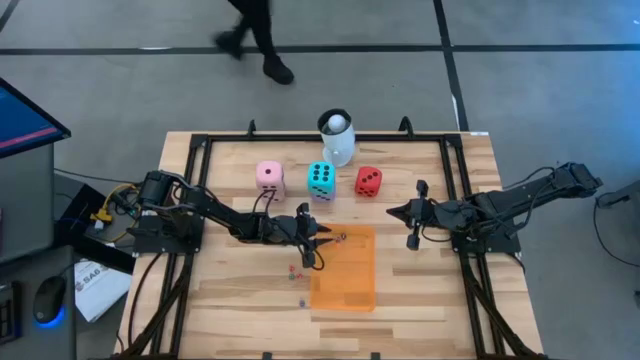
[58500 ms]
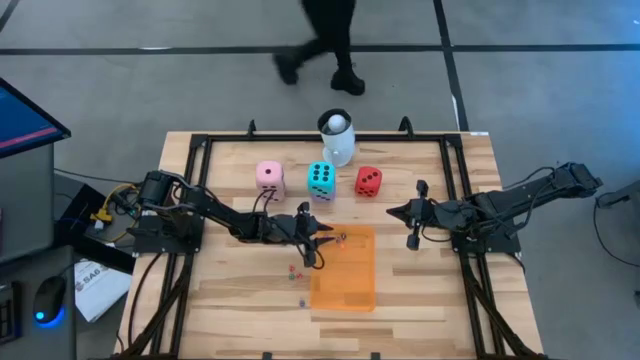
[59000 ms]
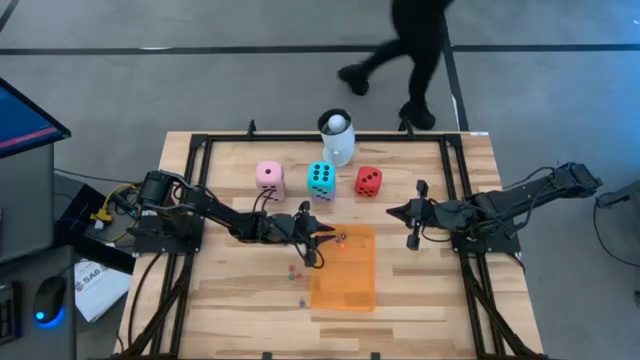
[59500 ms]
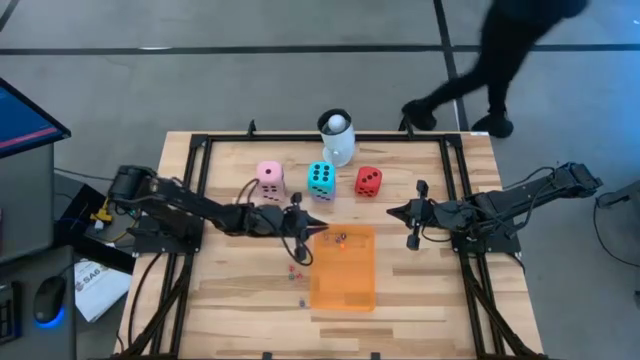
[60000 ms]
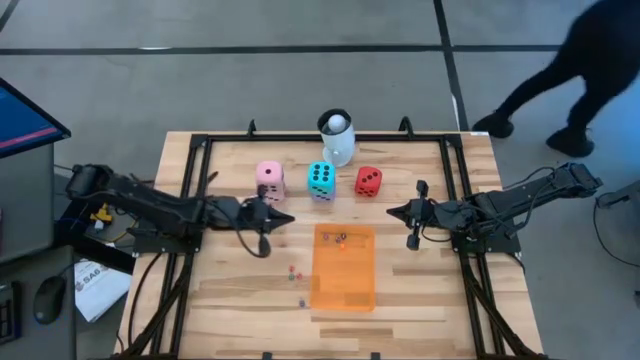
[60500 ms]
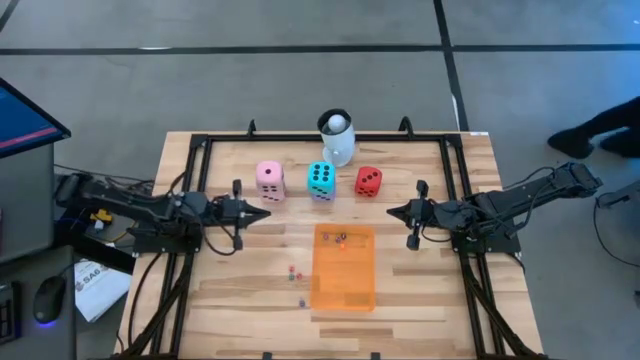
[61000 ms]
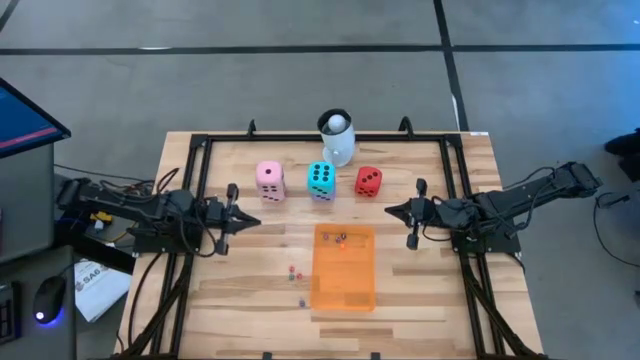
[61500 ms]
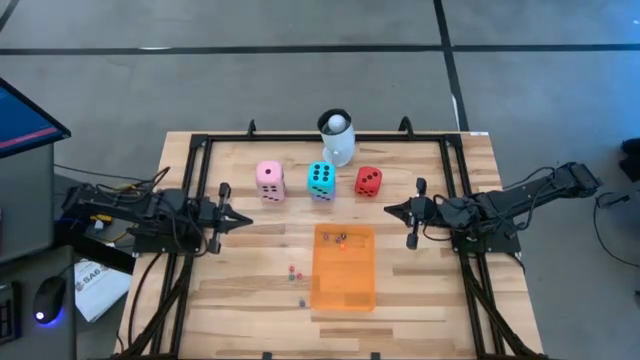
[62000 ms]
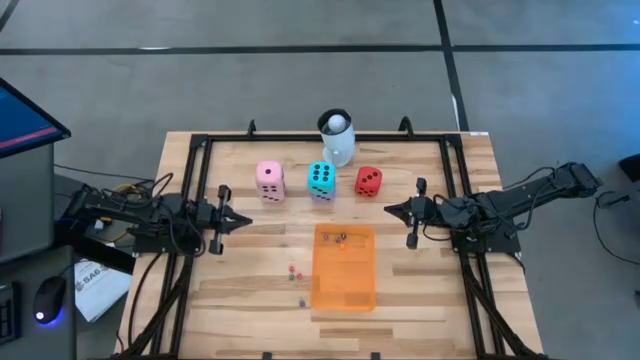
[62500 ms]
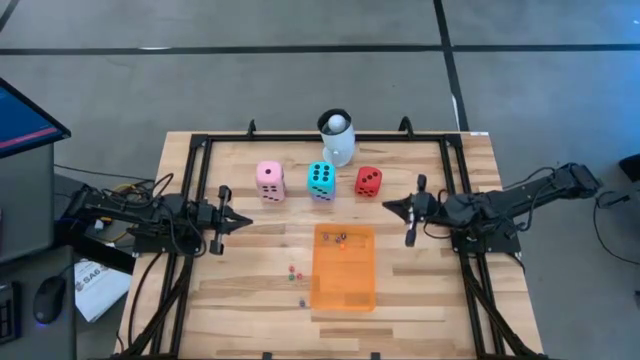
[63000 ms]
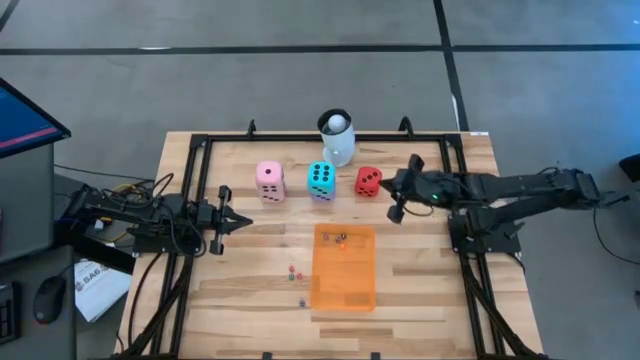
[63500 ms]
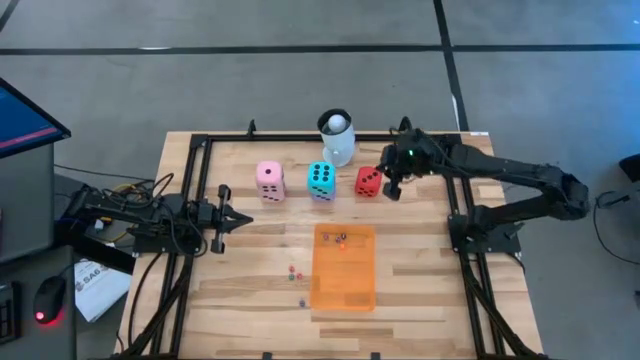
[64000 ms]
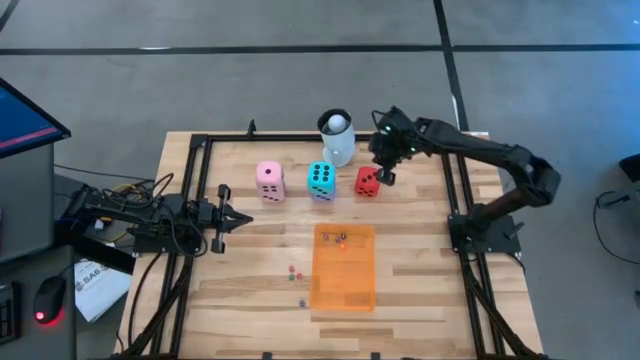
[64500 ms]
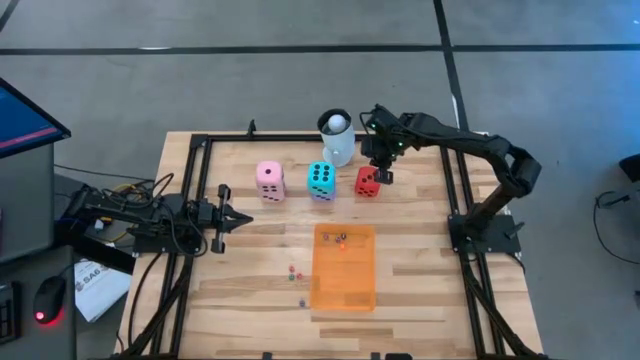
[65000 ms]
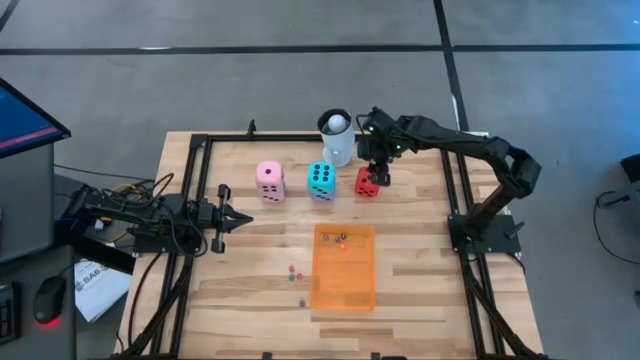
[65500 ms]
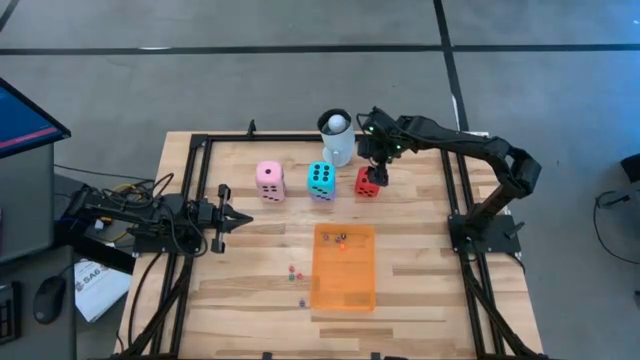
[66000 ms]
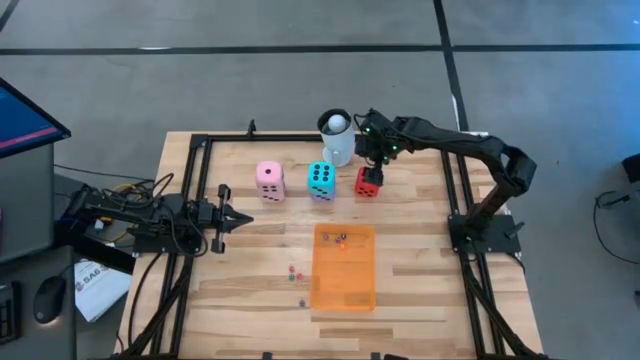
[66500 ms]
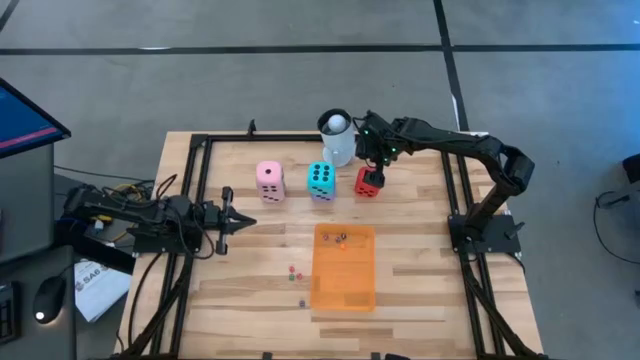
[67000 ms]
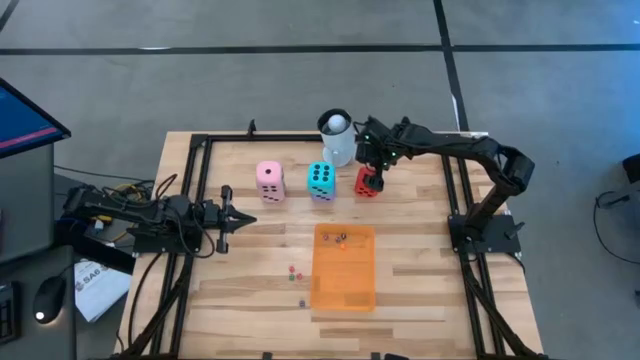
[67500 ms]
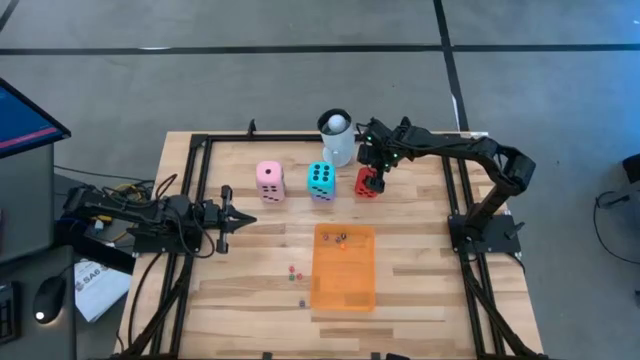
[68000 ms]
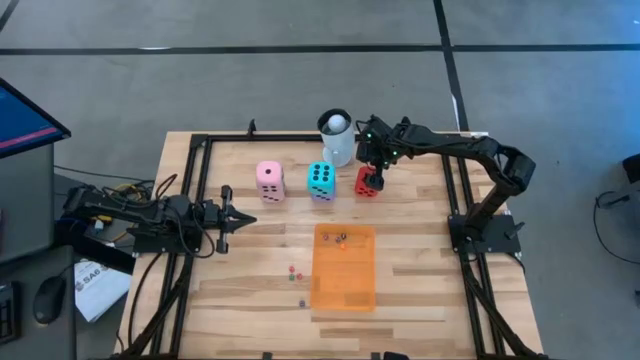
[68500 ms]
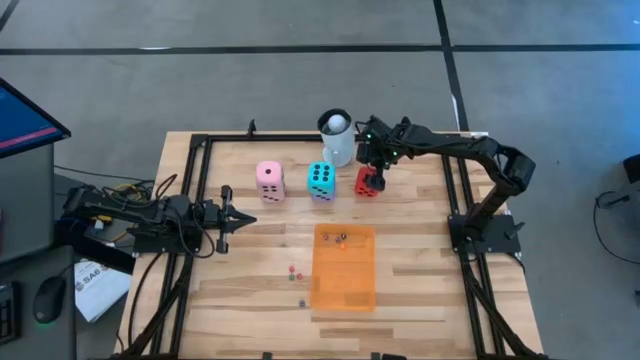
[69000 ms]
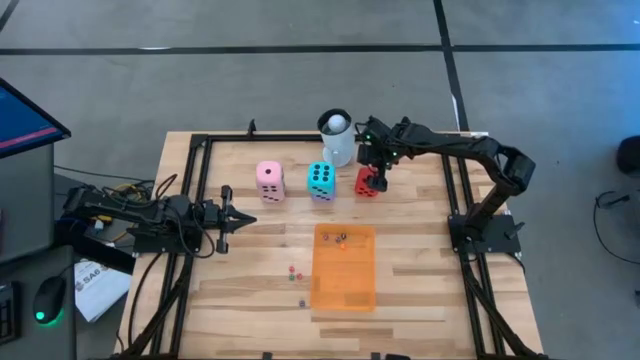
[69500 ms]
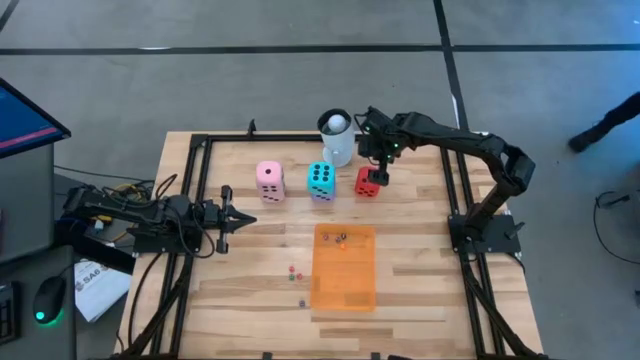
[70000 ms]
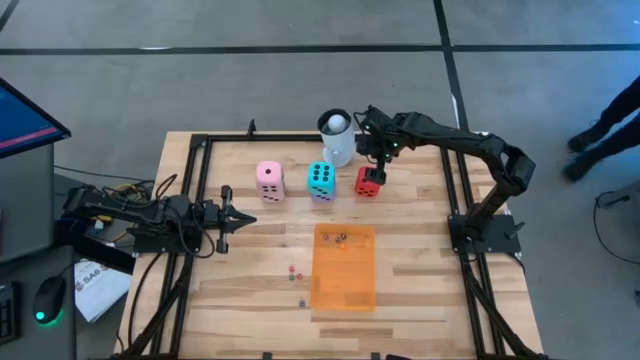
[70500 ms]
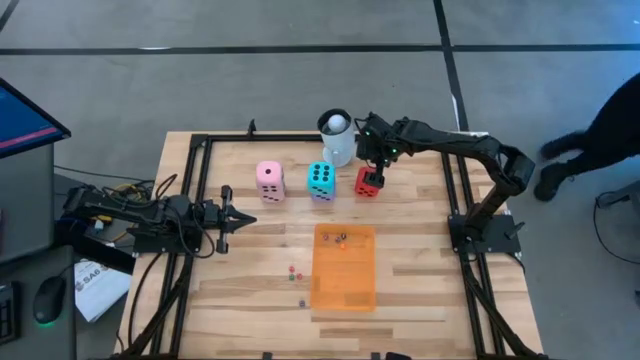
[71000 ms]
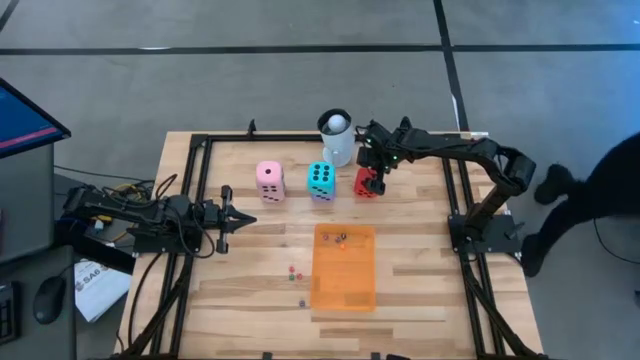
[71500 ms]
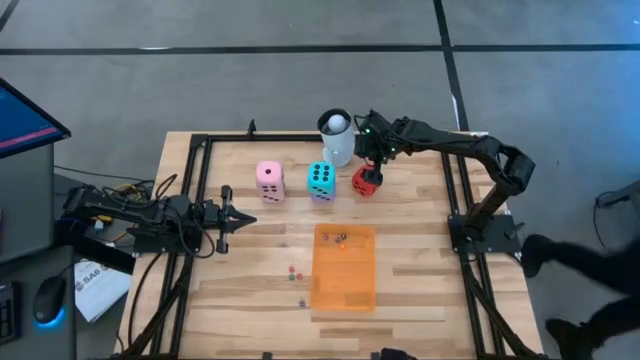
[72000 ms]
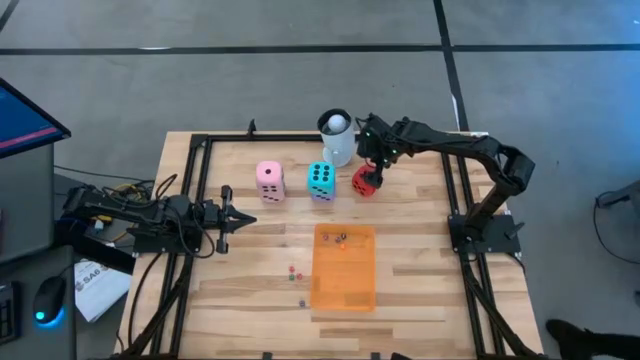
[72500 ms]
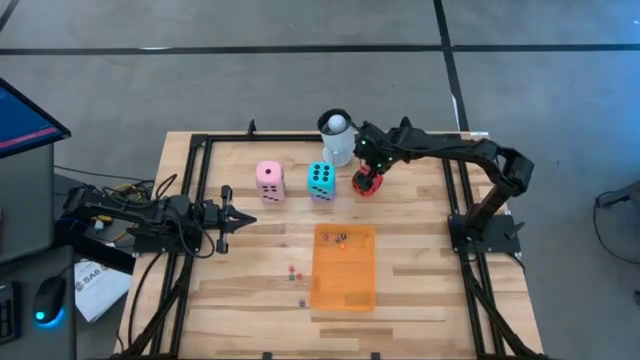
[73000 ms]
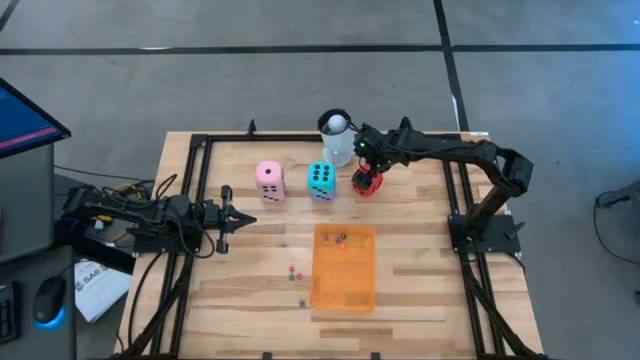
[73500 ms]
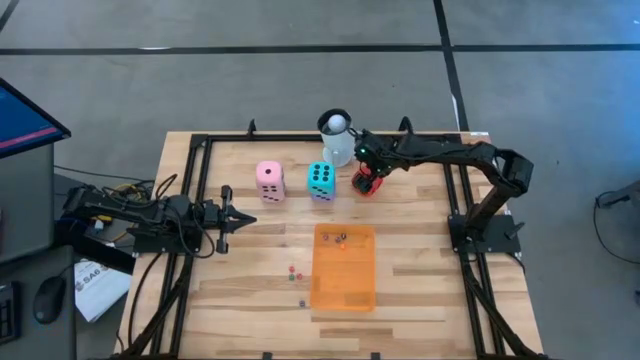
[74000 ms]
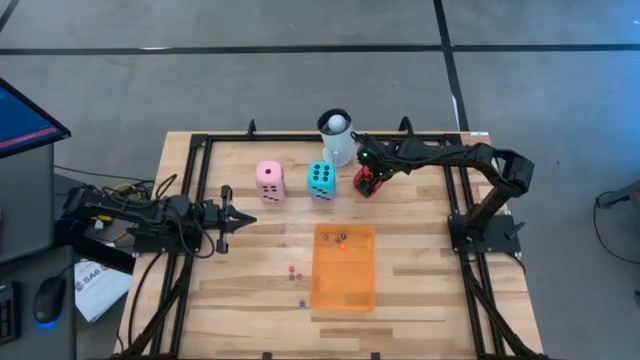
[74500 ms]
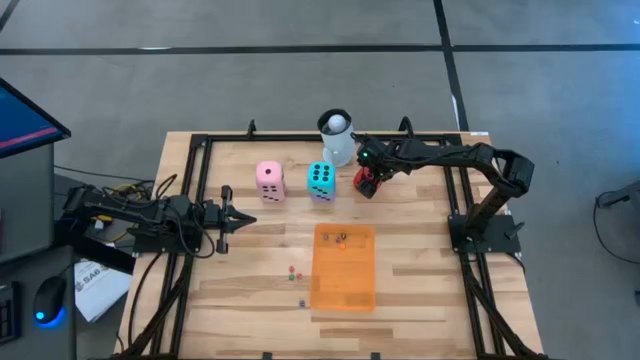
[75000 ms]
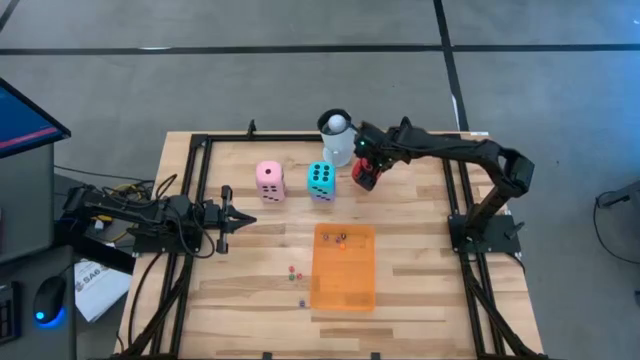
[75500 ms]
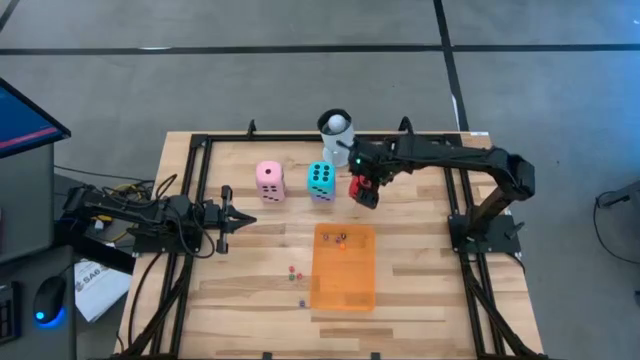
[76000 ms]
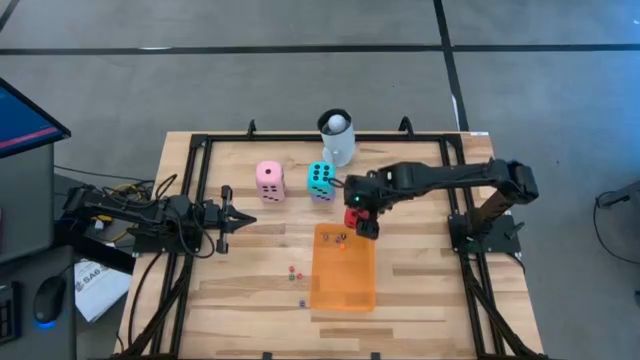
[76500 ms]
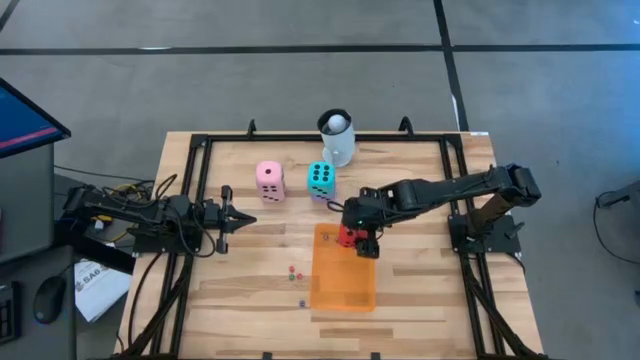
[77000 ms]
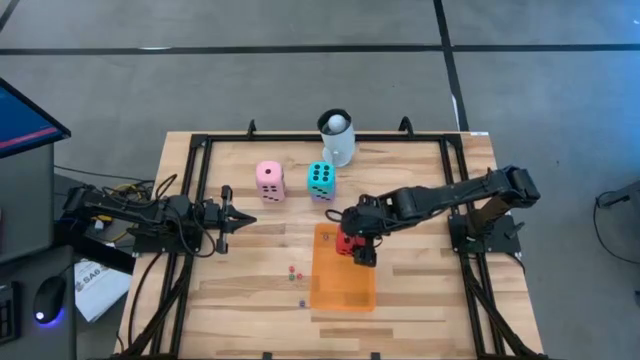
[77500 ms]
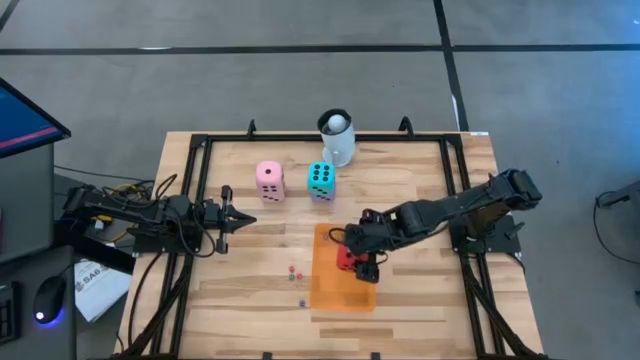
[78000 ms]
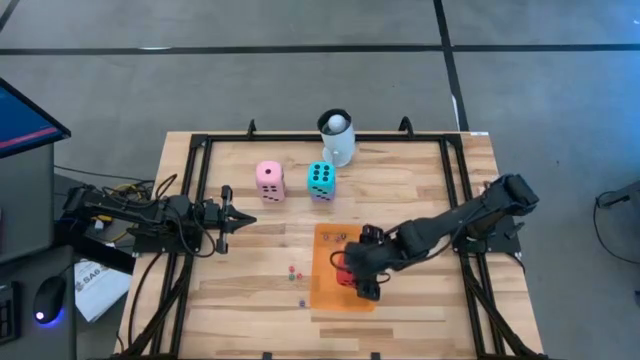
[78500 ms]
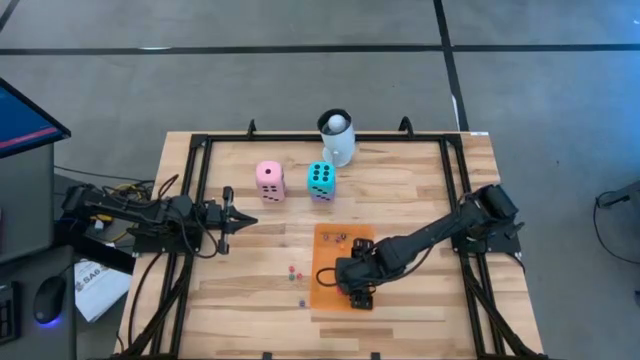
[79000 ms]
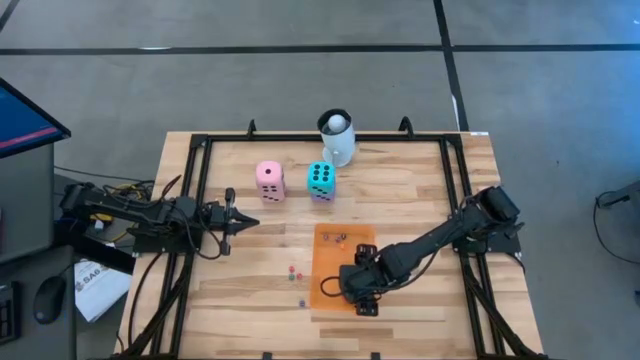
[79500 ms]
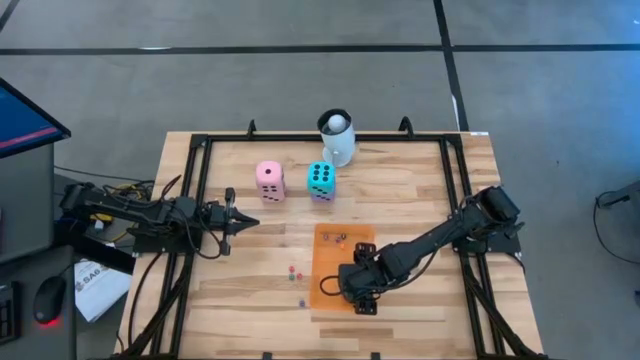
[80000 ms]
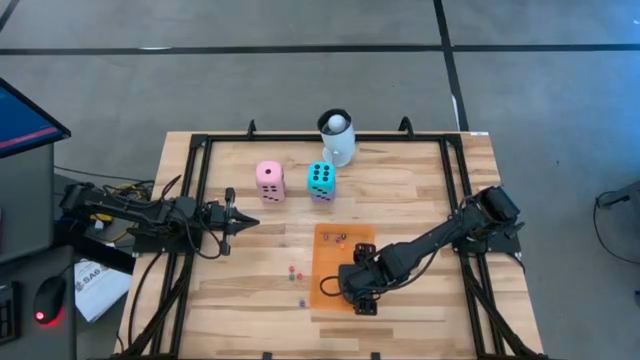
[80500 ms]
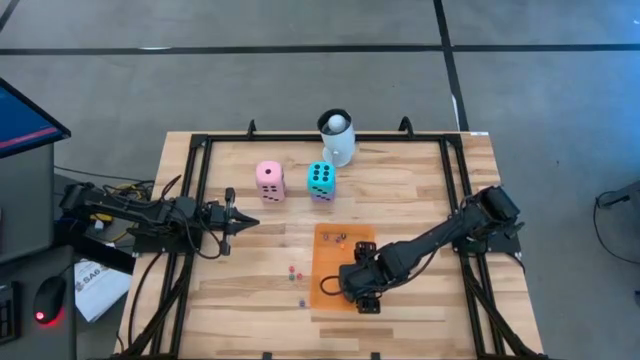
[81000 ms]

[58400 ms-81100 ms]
Task: Pick & Place Dice
Put the large red dice into the orange bin
